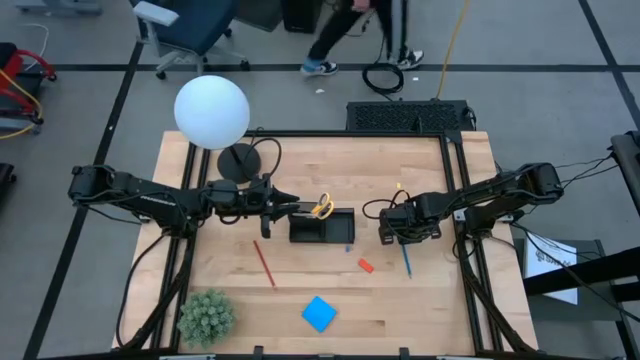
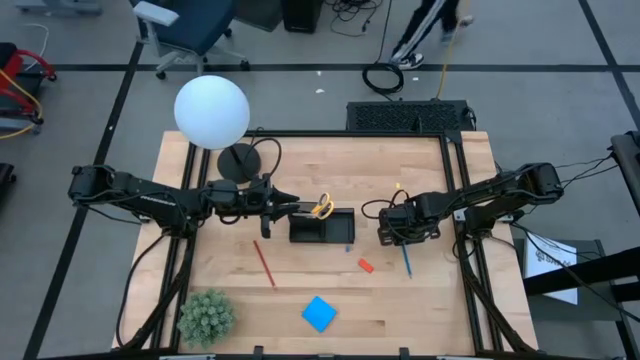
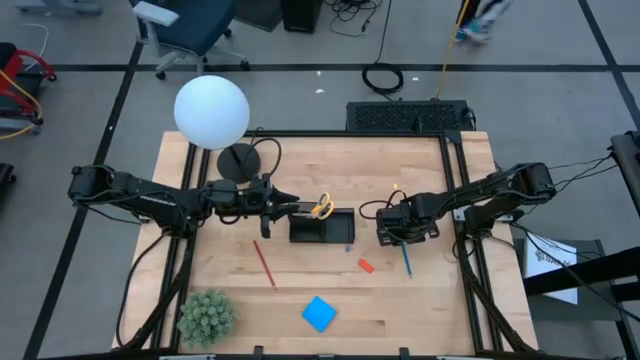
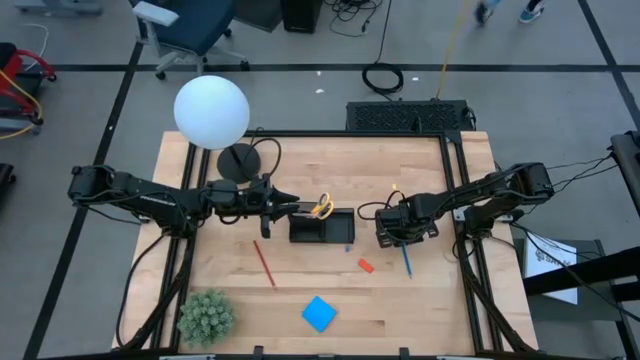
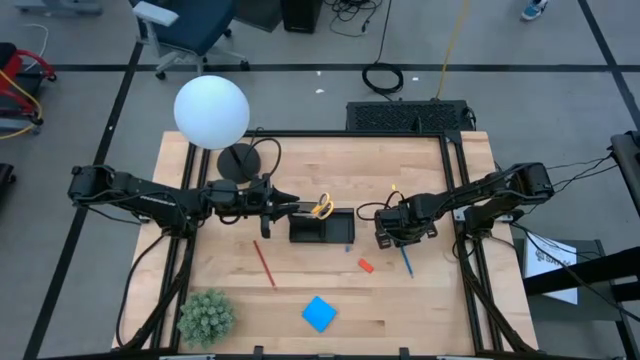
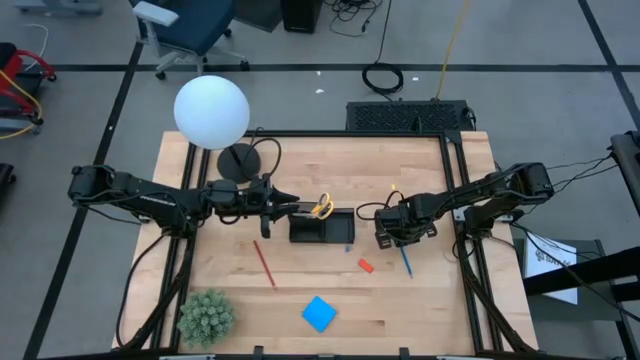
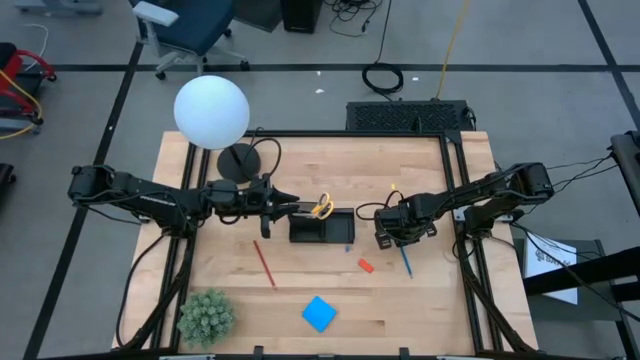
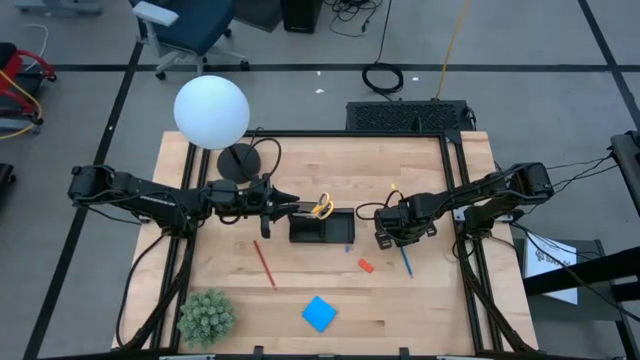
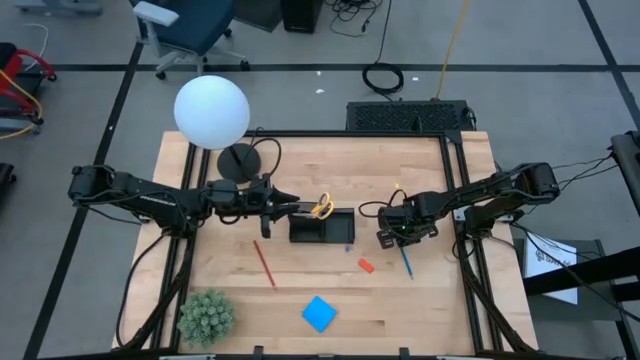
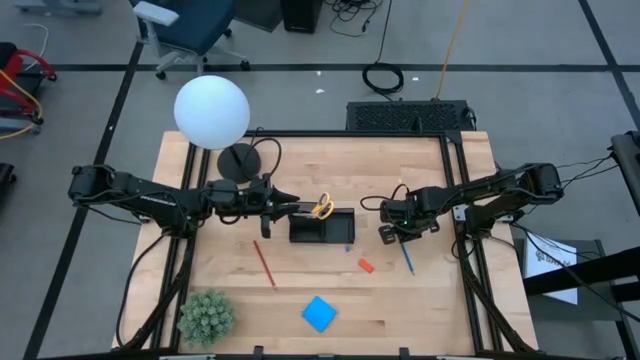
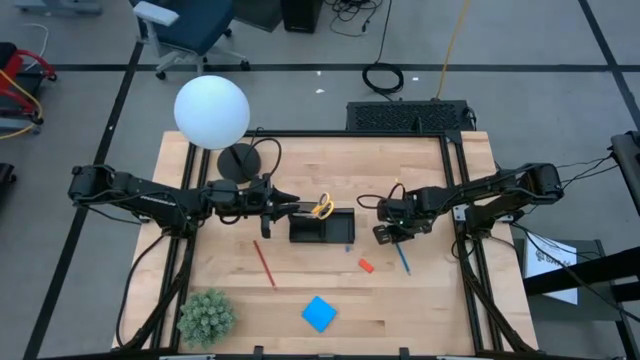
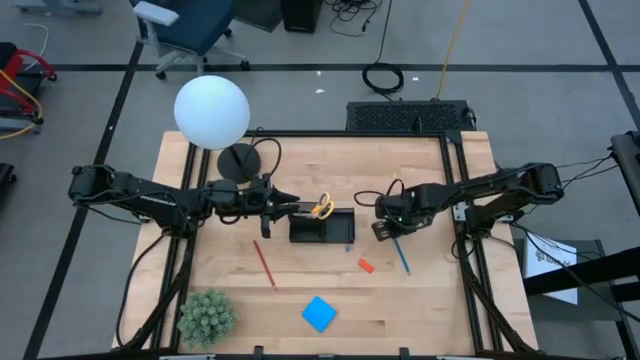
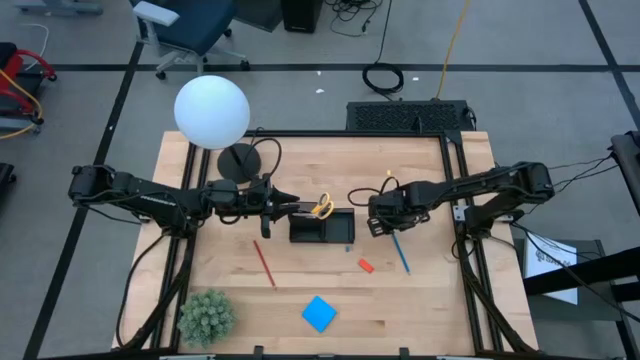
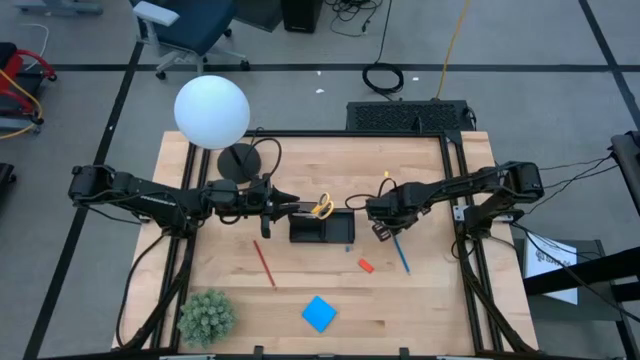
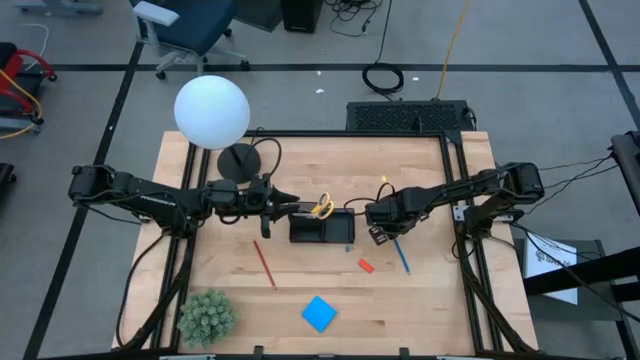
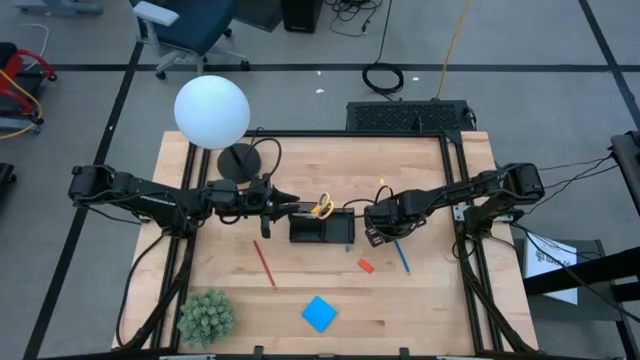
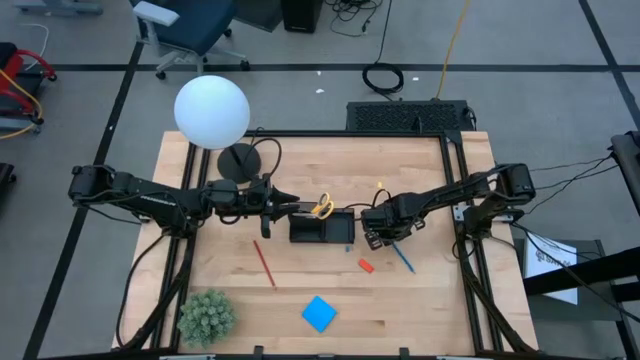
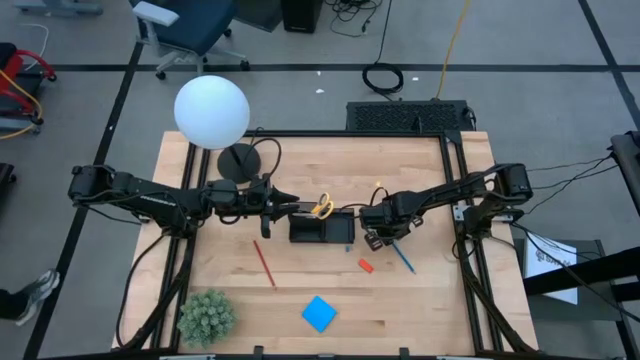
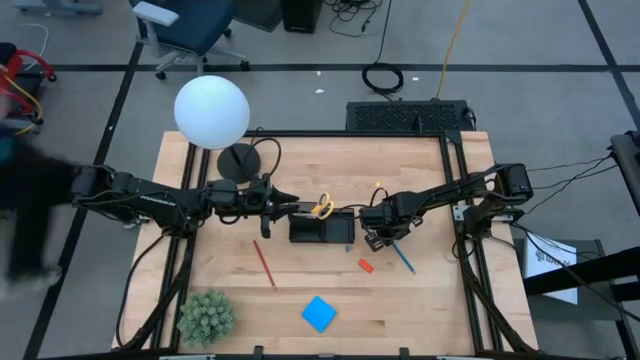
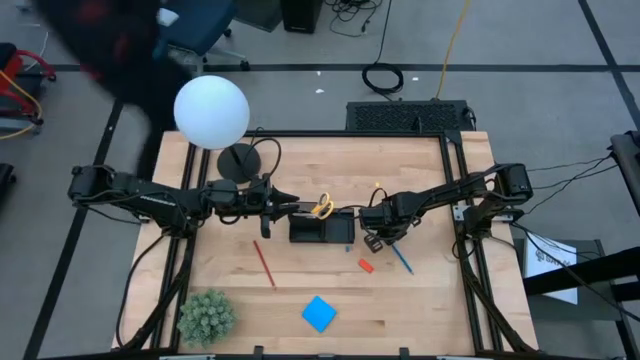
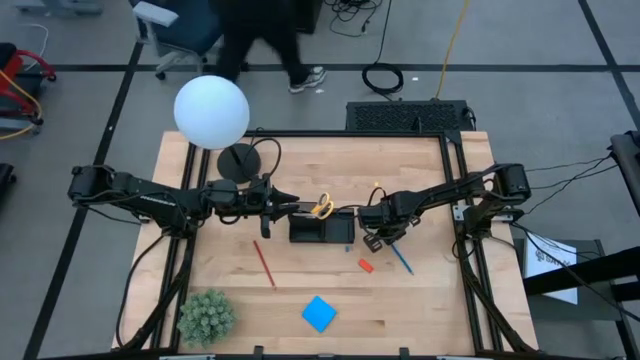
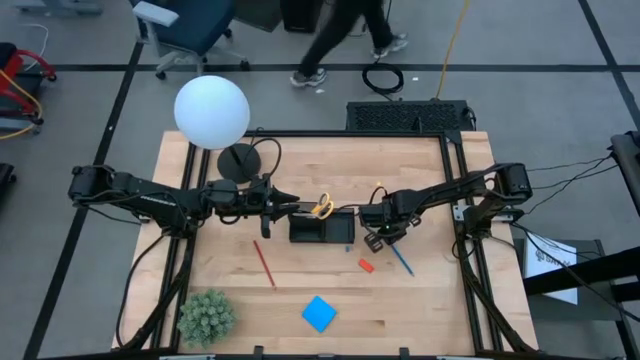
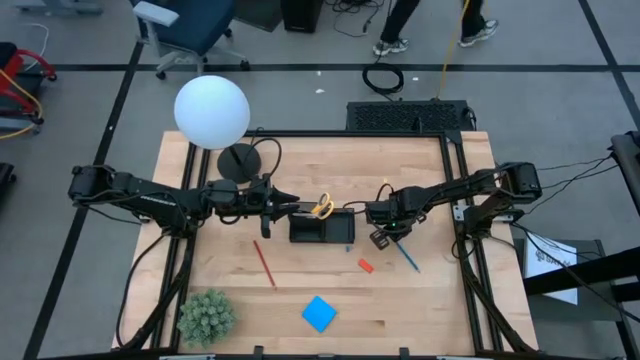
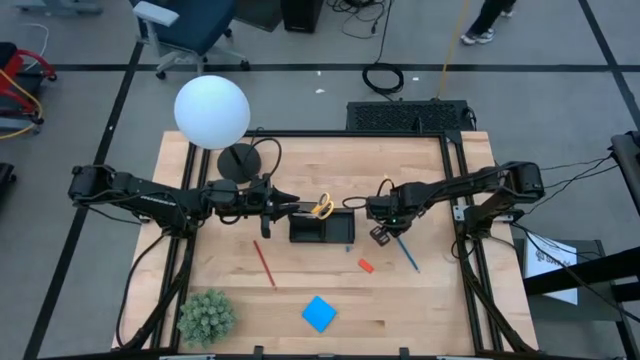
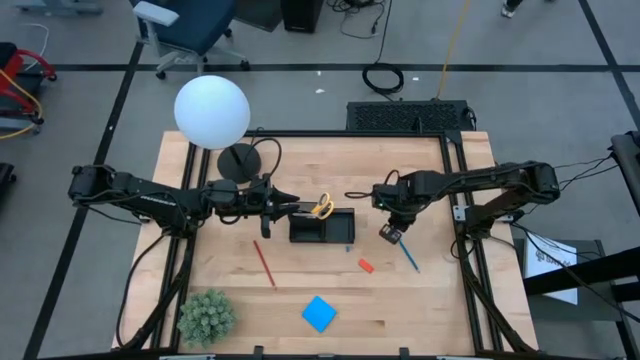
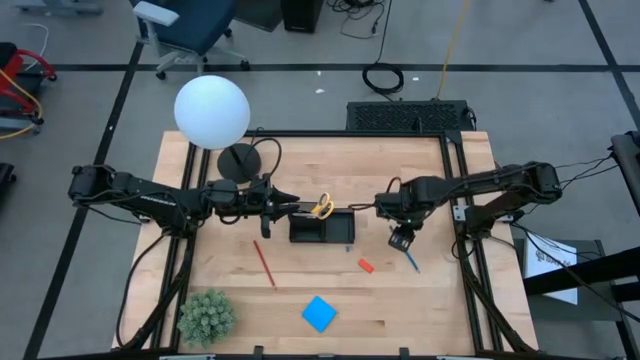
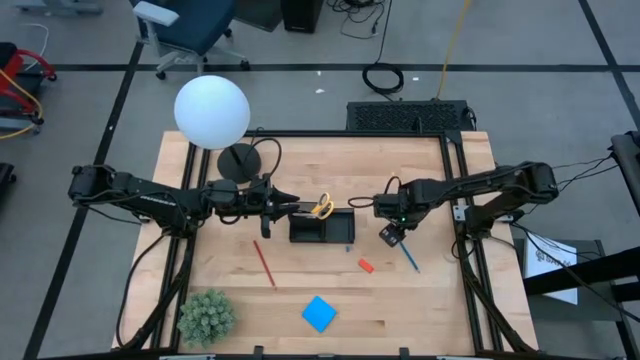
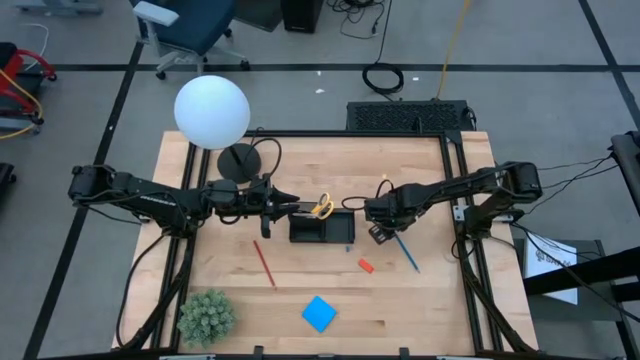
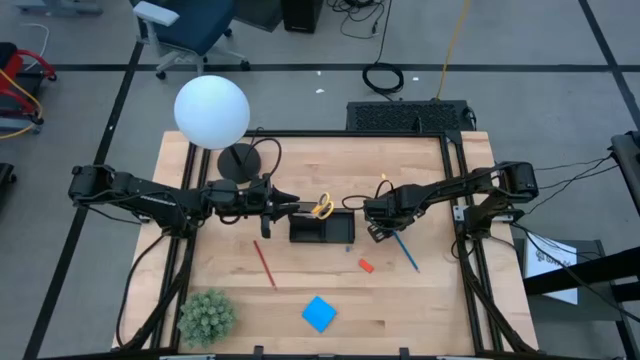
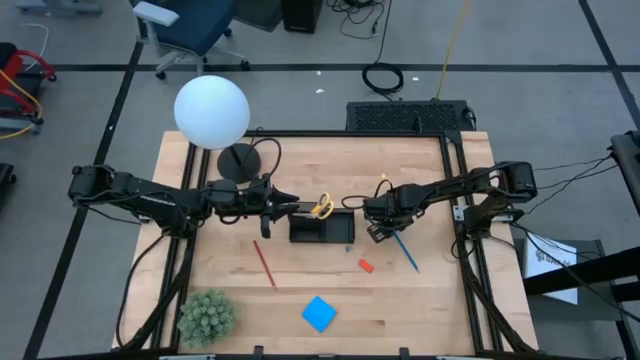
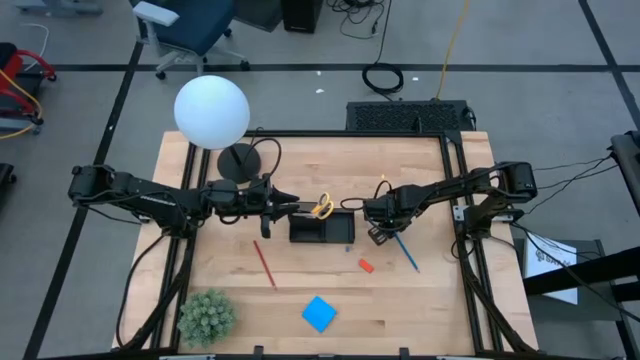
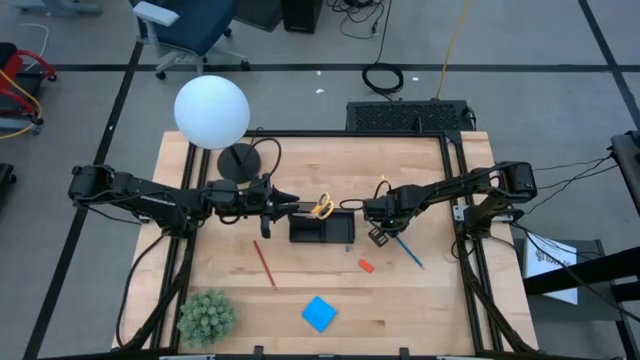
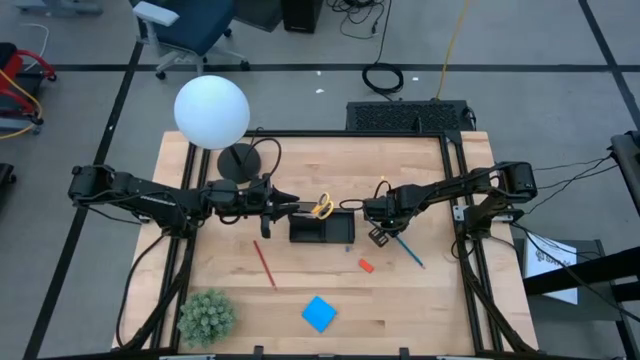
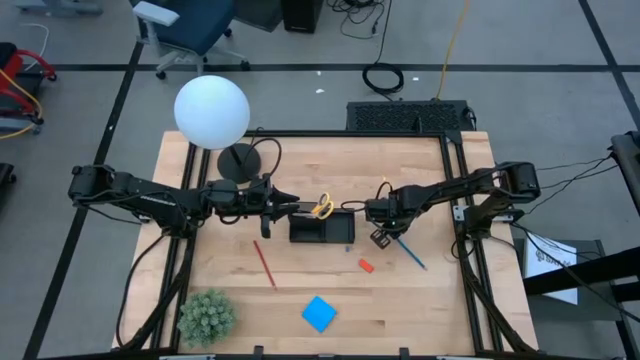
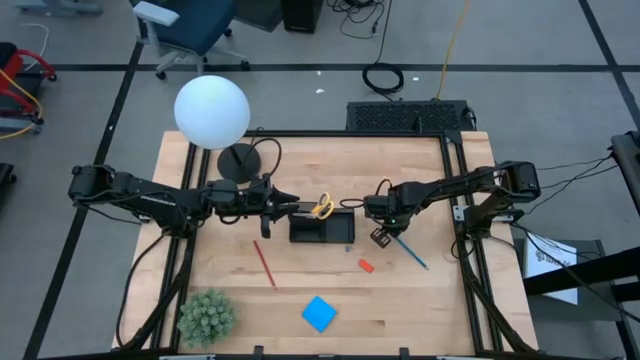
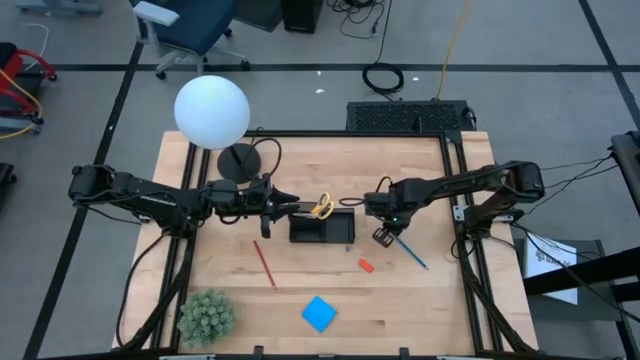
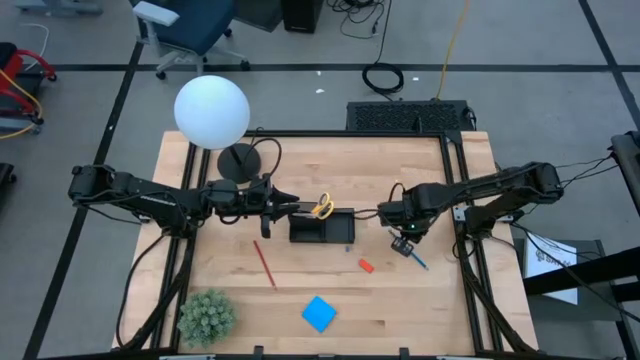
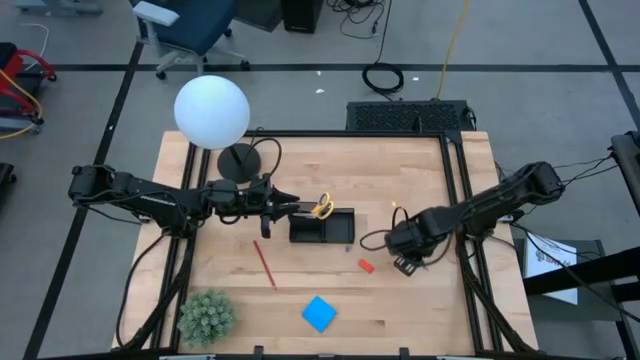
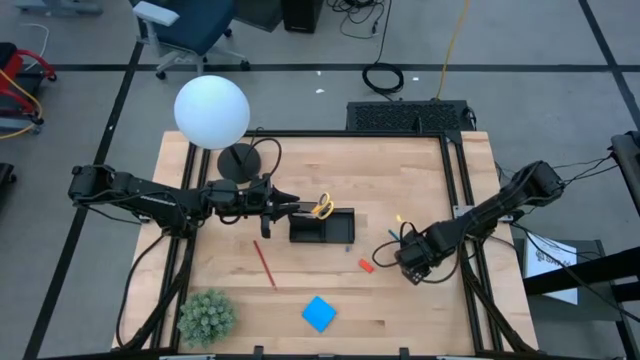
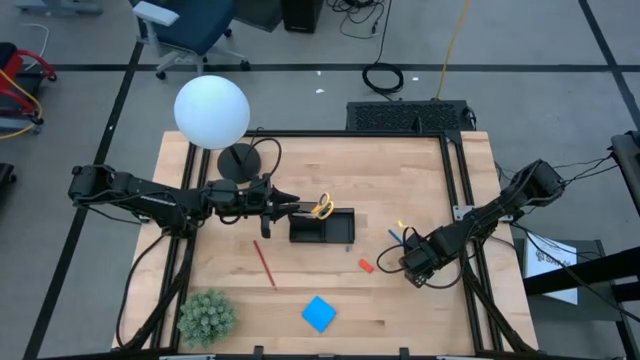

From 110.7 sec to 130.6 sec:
Task: Pick and place office supplies into organizer
Put the blue pencil into the desk organizer
